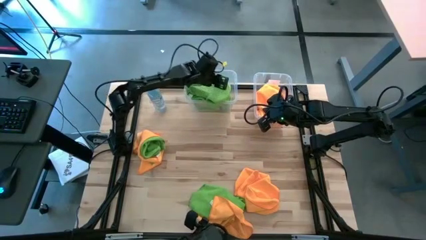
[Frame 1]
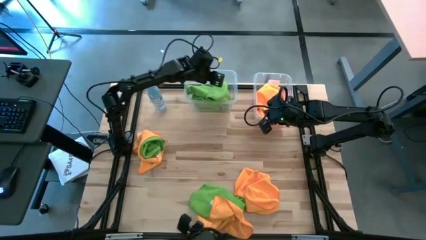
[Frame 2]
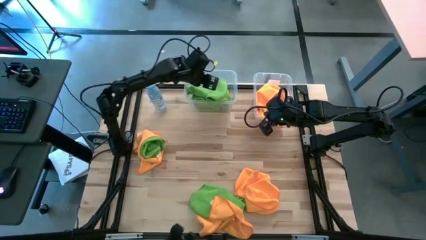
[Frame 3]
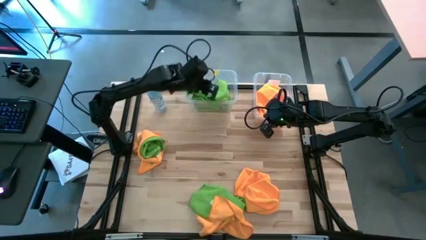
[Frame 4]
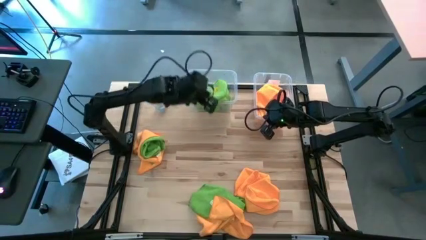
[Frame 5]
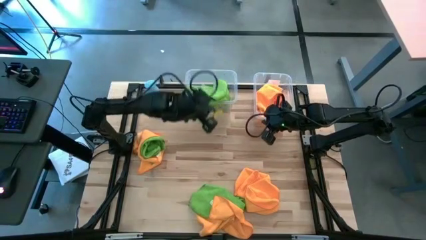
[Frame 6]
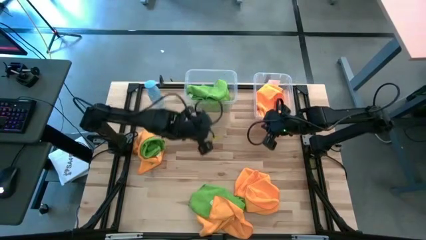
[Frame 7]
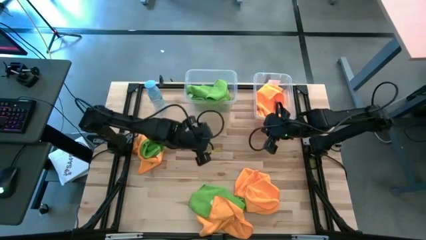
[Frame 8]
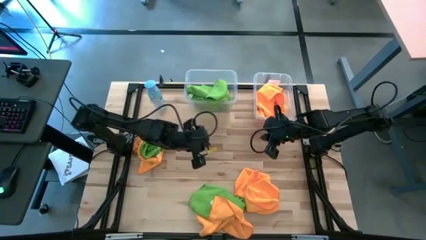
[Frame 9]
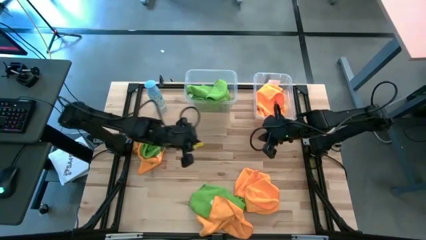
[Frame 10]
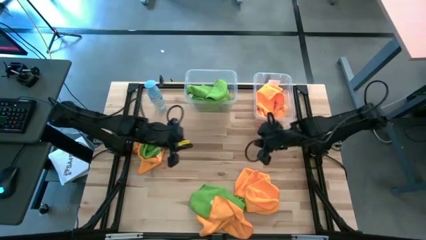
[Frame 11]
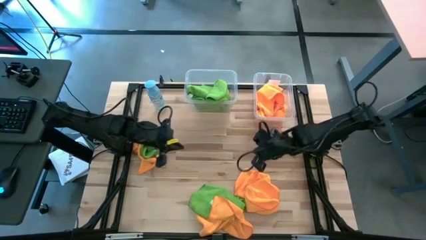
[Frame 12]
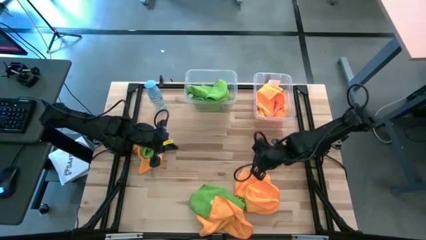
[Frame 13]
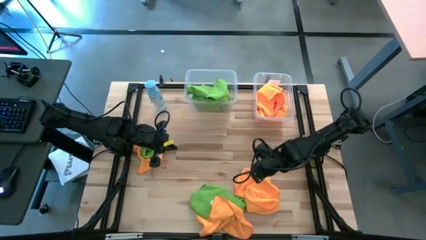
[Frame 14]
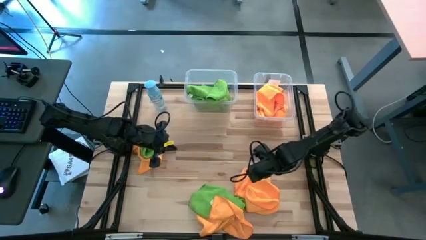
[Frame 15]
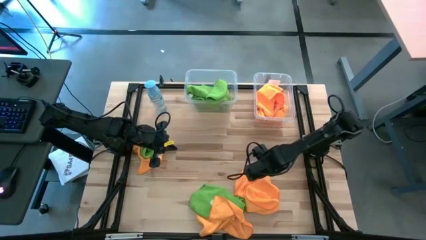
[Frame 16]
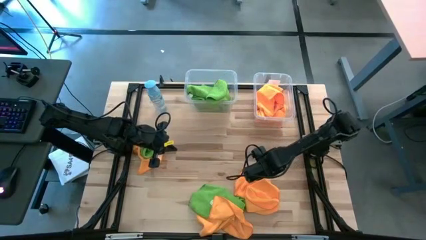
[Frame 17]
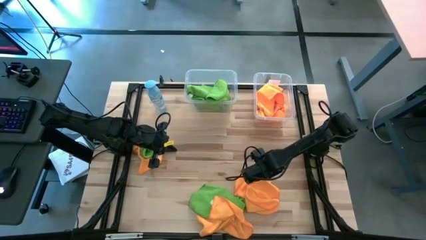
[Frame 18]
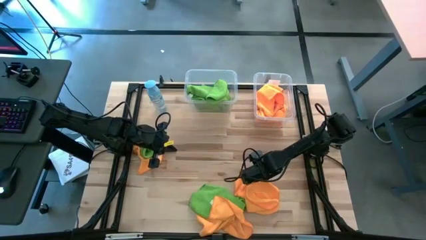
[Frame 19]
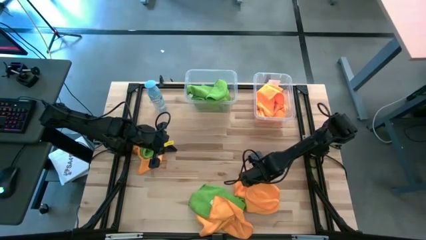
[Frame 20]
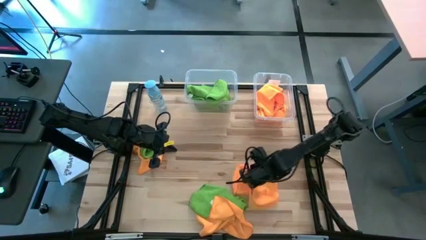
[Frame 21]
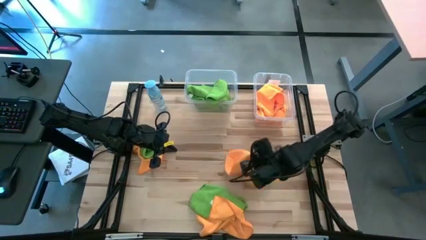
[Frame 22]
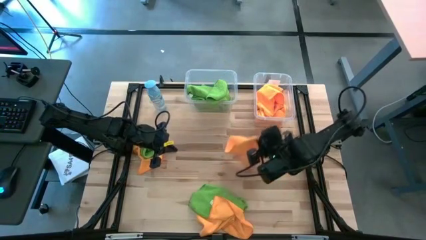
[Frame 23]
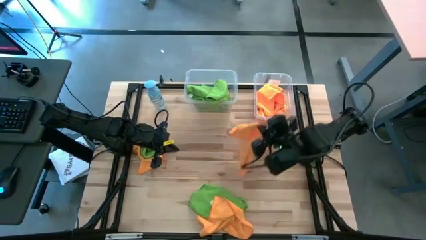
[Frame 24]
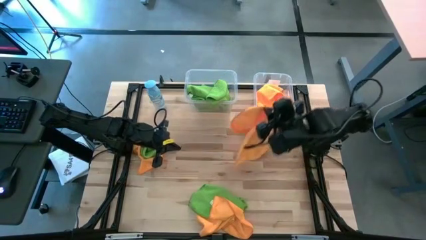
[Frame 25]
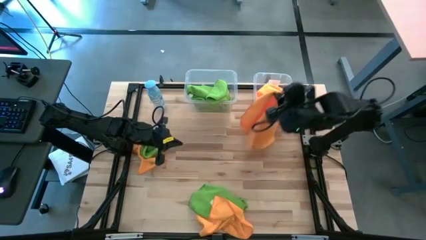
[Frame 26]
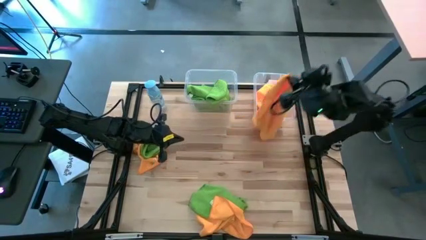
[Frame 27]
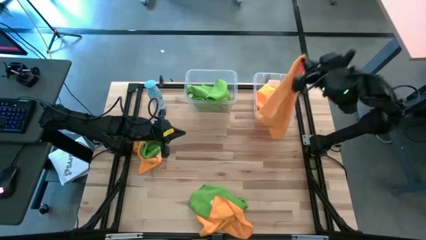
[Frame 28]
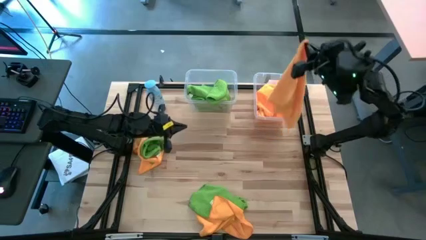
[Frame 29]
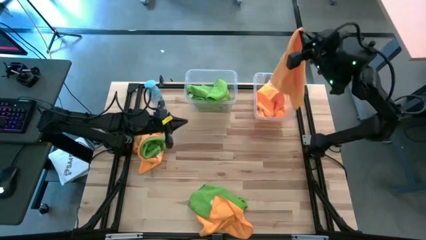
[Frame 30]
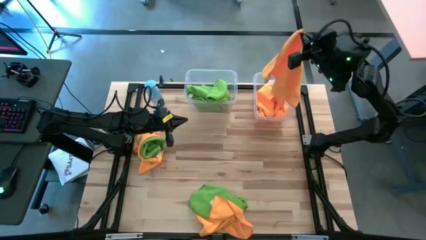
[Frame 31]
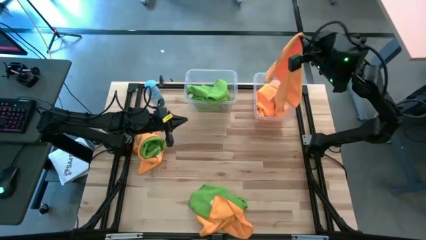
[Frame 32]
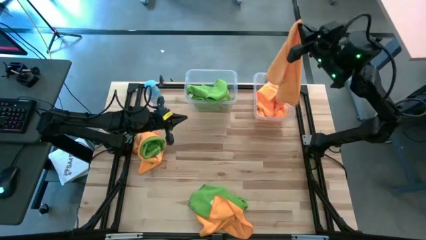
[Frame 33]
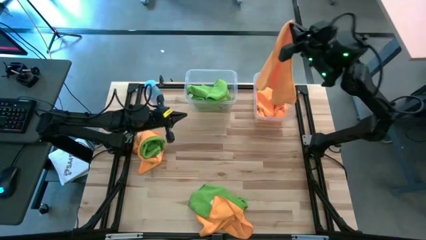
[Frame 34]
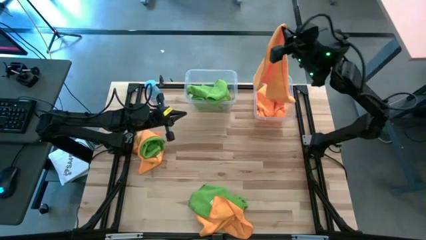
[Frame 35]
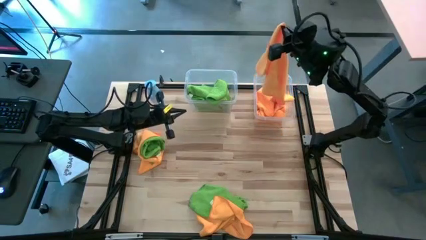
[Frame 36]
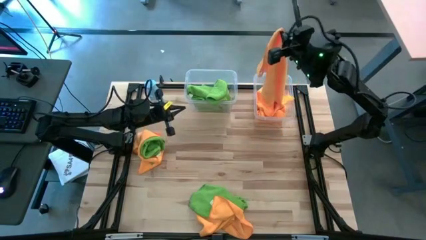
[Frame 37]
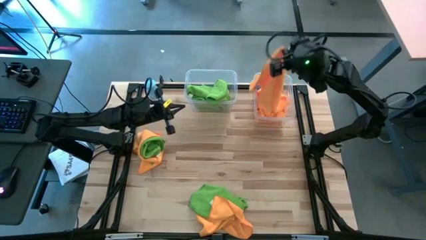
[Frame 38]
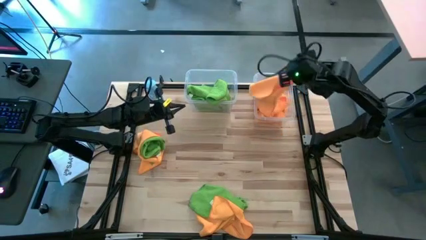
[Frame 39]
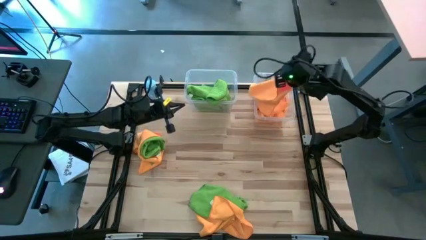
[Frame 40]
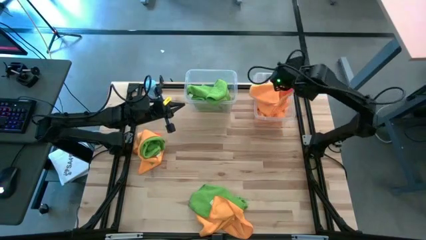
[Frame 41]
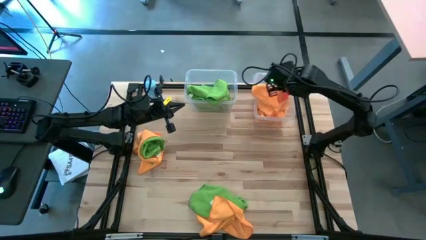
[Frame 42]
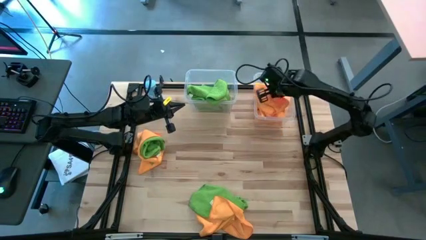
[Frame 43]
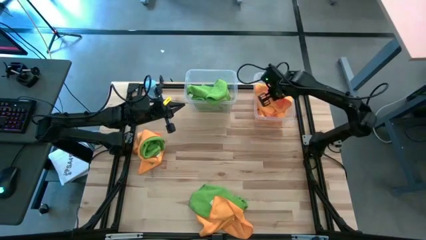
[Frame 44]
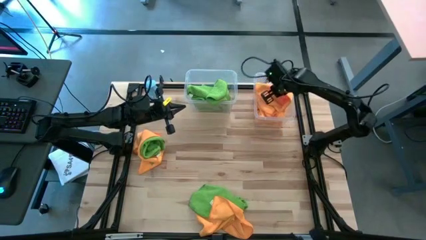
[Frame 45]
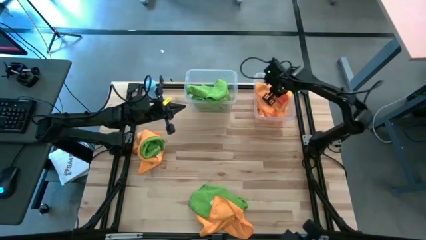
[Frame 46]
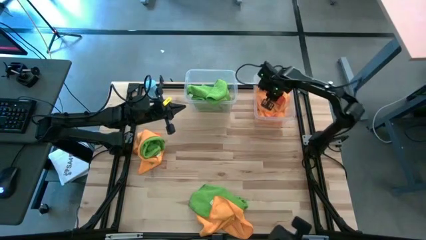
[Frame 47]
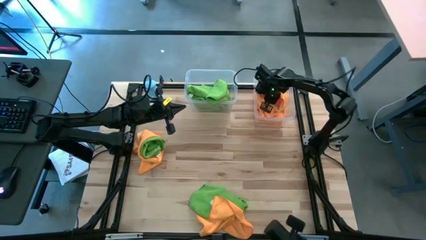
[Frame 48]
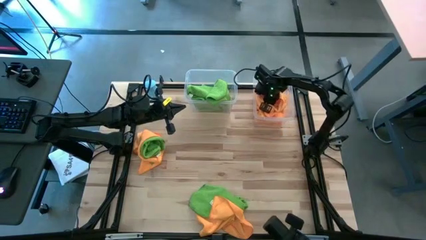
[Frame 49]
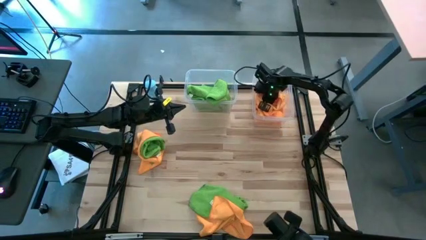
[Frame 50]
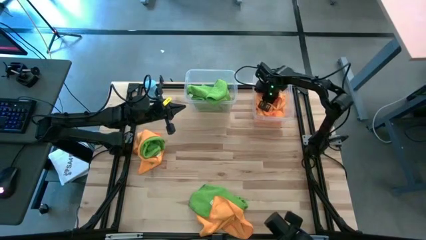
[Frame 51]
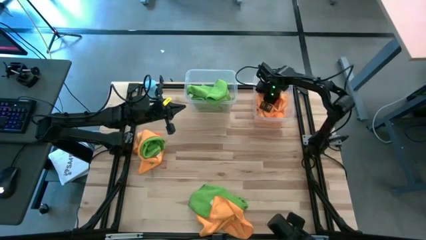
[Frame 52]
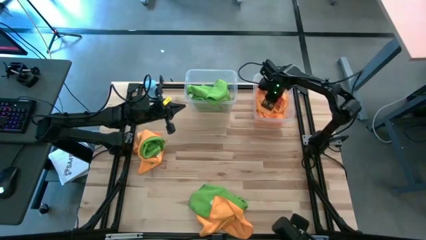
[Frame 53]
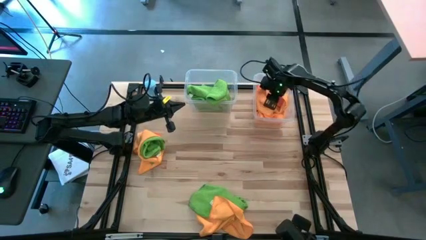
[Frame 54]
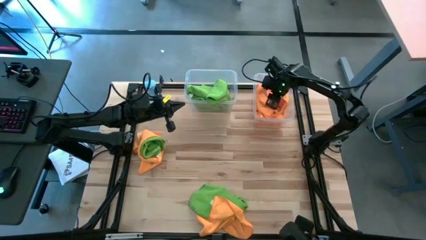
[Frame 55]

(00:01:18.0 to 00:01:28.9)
Task: Sort microfiber towel by color & place in baskets
Put the yellow towel into the right transparent bin
